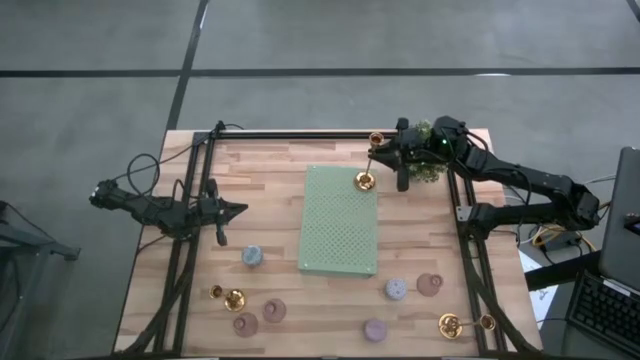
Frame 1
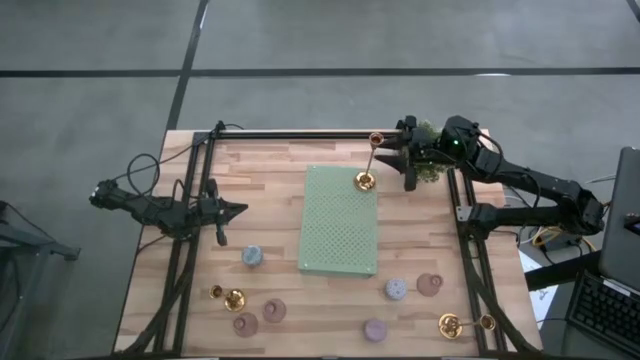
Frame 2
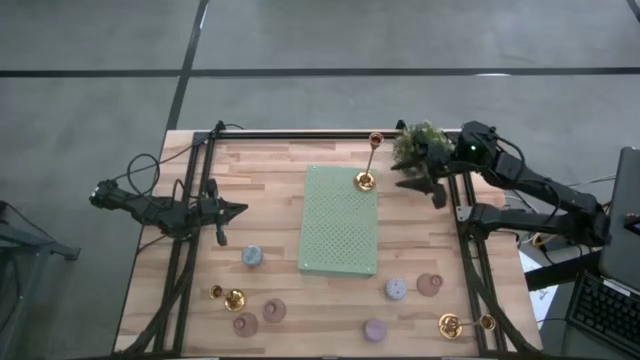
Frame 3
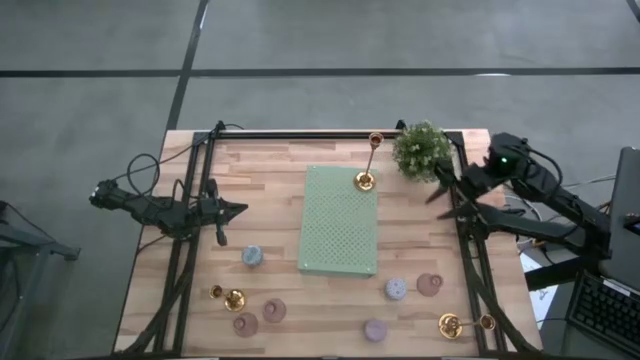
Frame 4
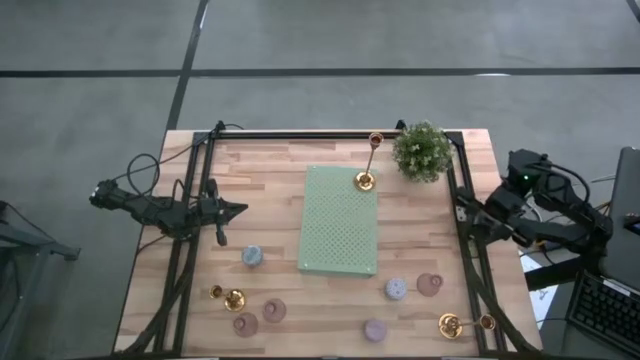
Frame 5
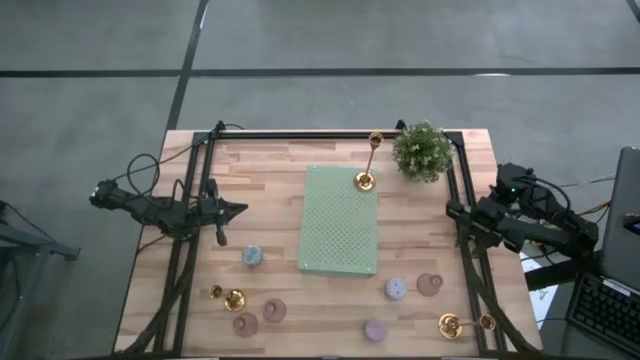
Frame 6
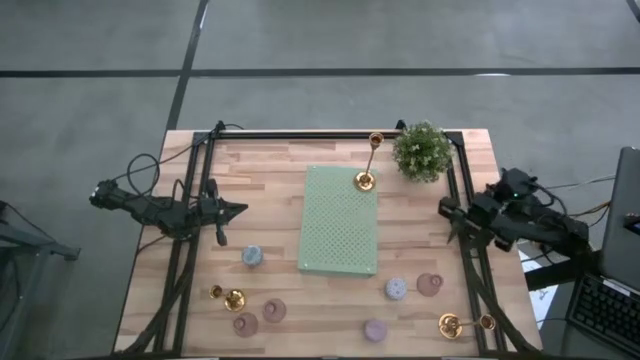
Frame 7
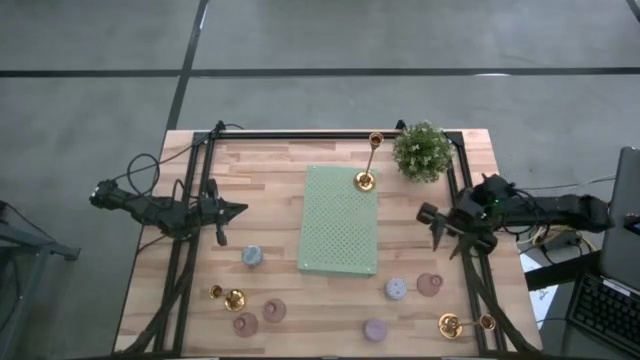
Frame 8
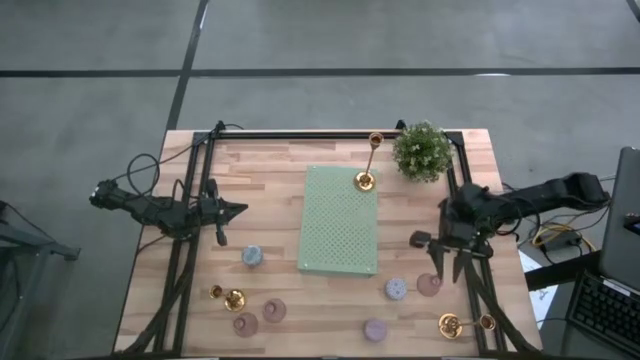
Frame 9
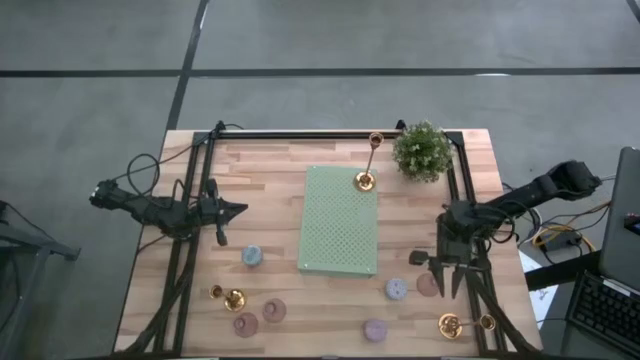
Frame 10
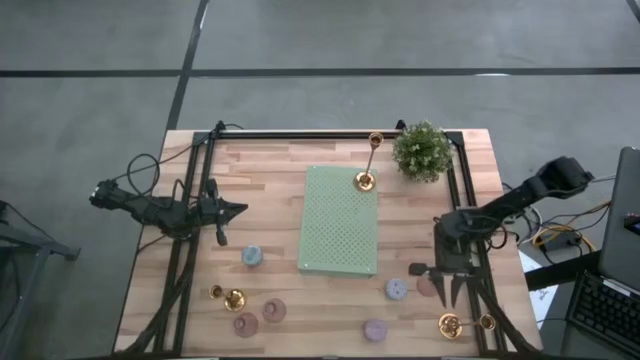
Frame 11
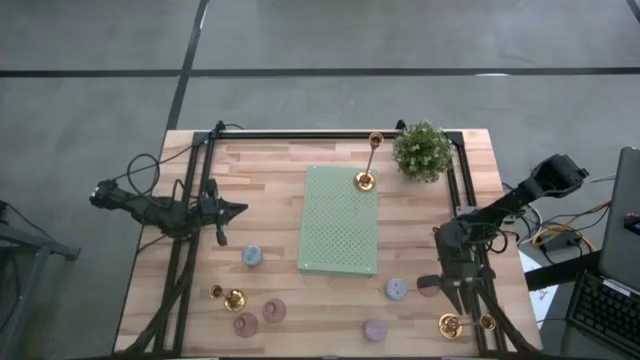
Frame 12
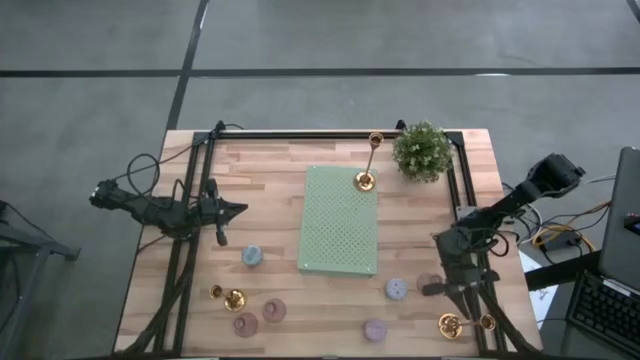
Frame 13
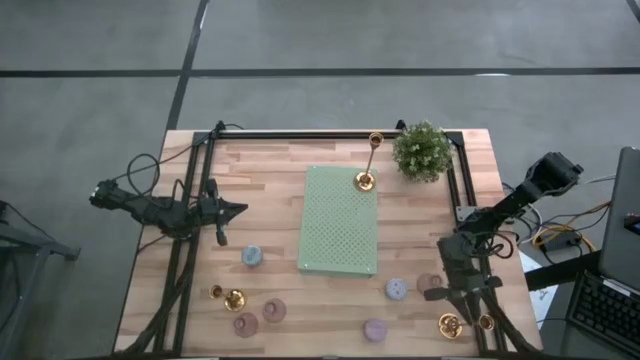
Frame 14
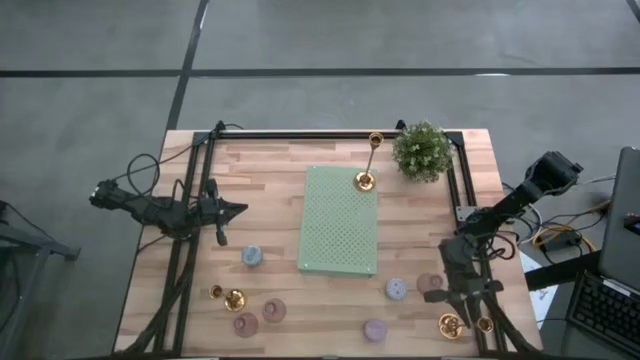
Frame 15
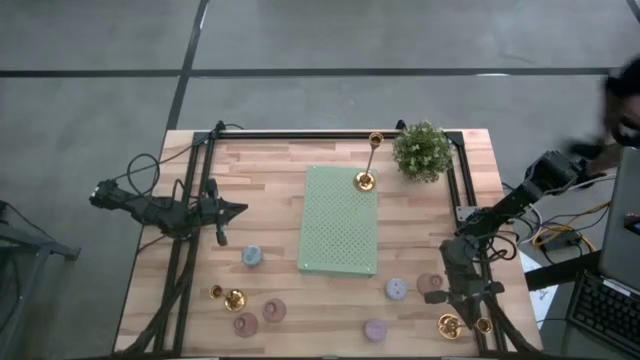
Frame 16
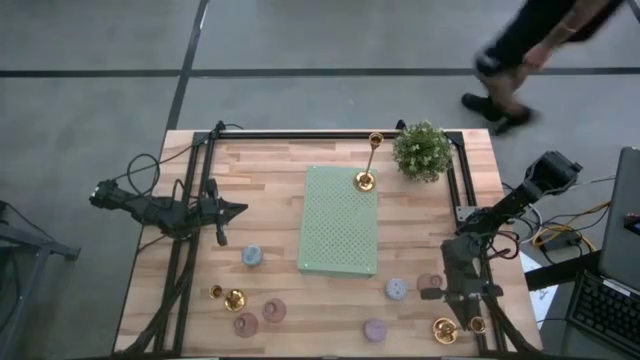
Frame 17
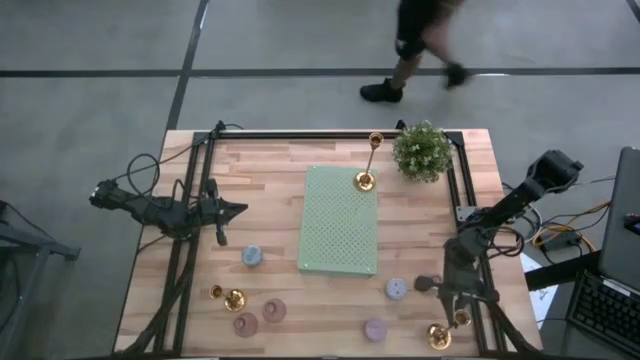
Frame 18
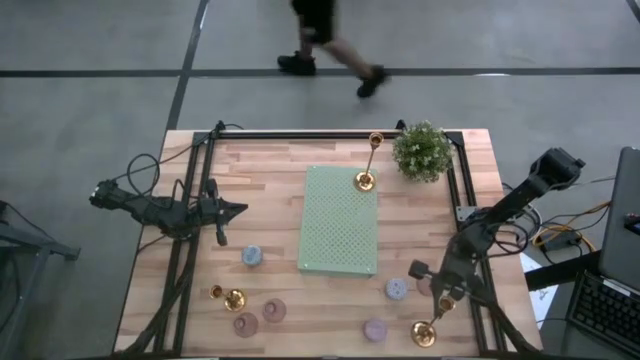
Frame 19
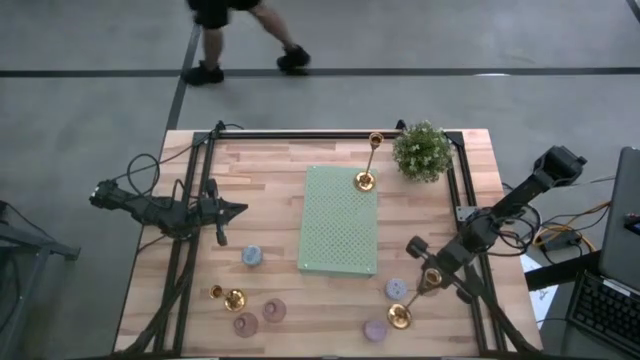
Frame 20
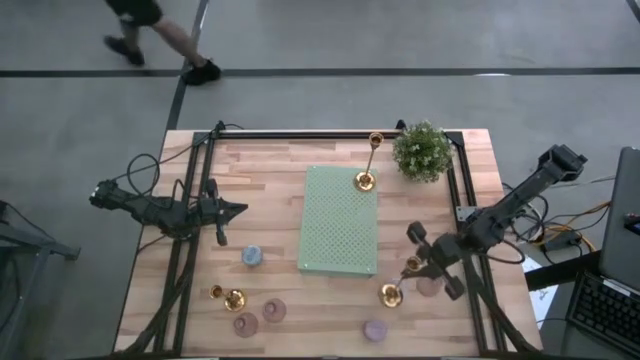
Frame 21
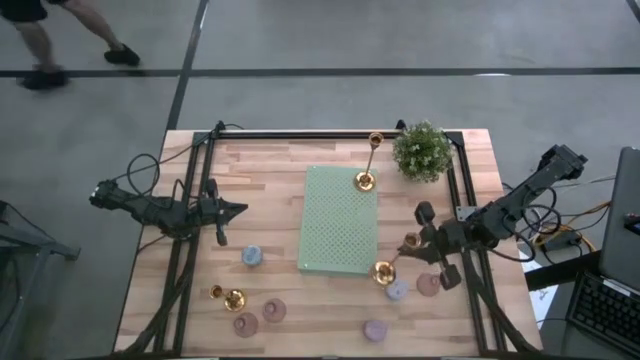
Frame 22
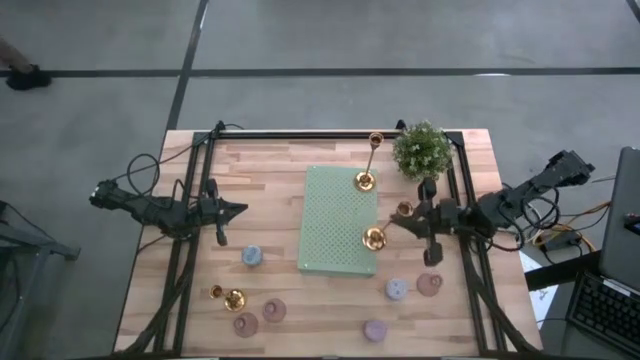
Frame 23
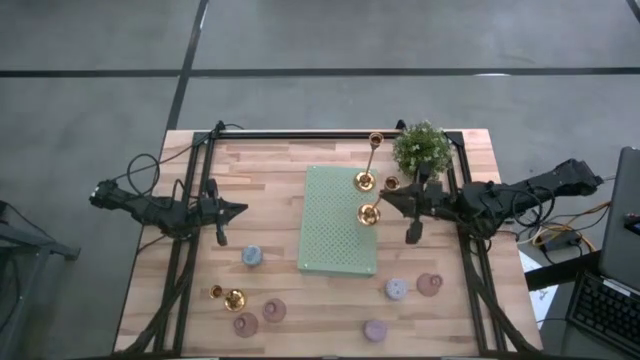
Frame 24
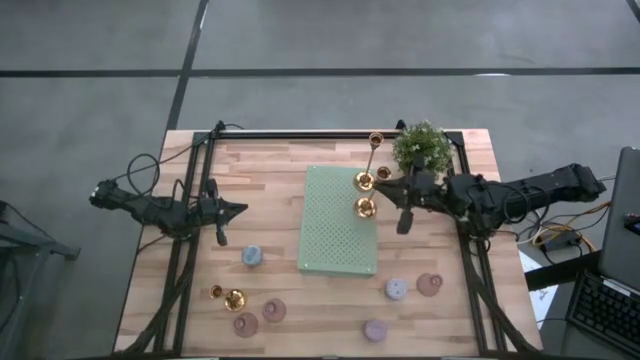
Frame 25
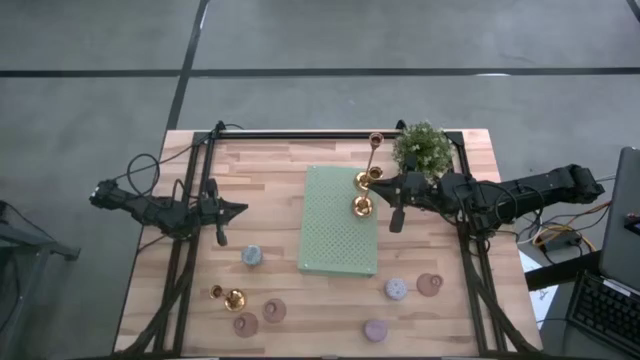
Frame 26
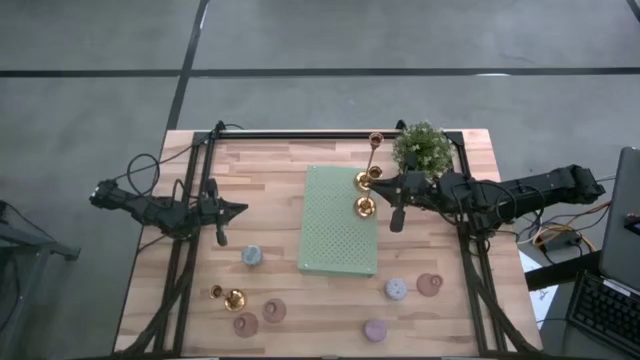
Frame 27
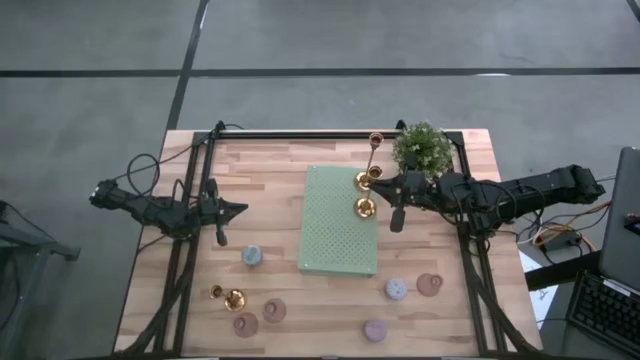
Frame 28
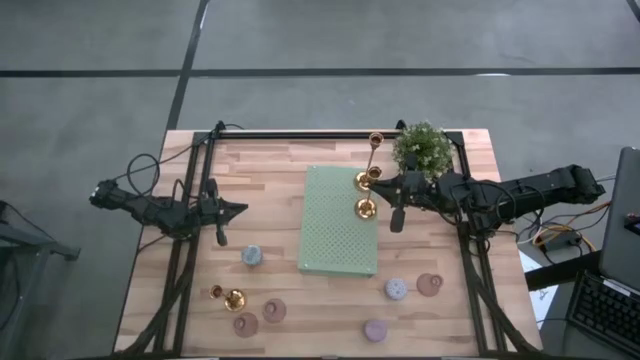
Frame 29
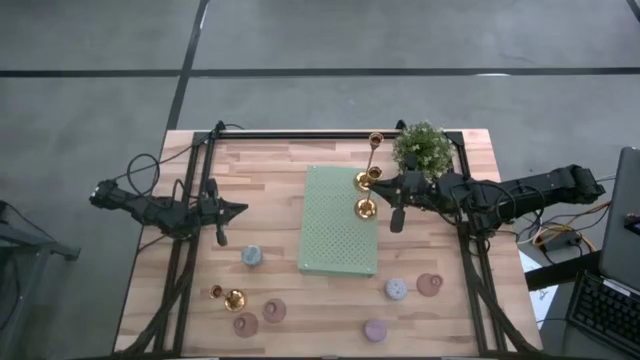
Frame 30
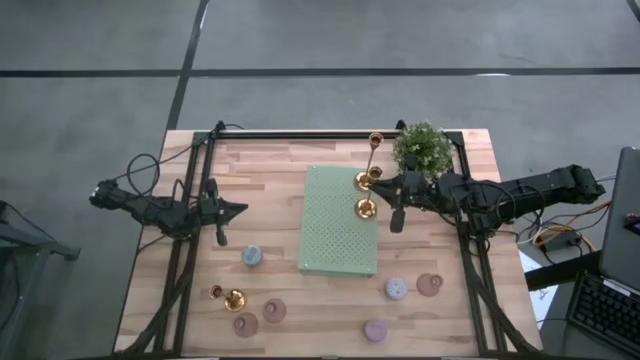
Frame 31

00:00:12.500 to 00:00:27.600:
Task: Pick & Place candle stick holders
Put the right gold candle holder on the shelf aligned with the other gold candle holder

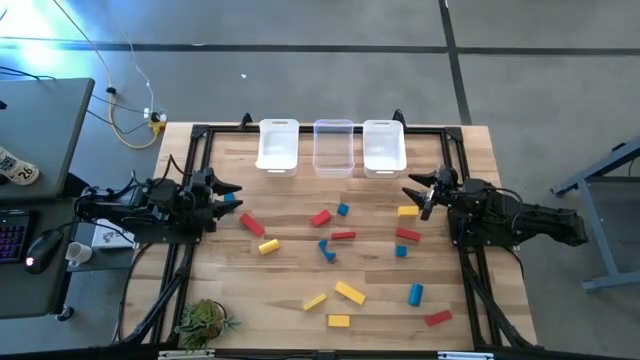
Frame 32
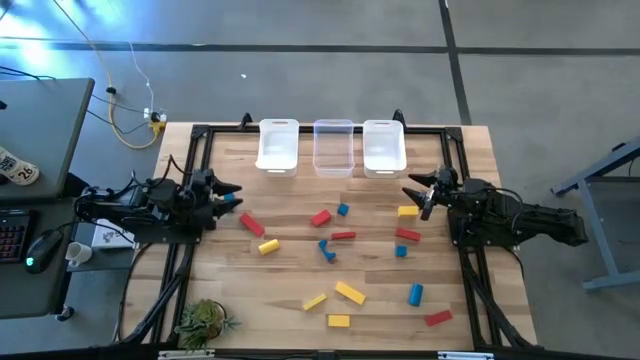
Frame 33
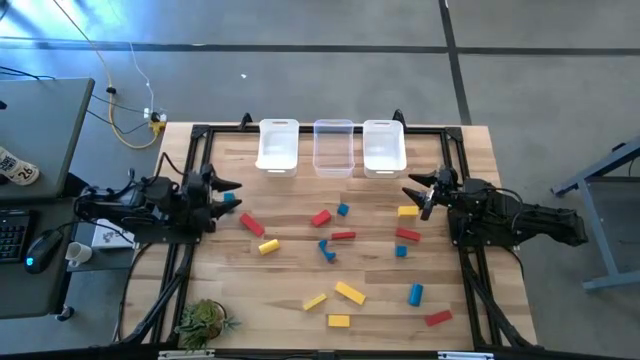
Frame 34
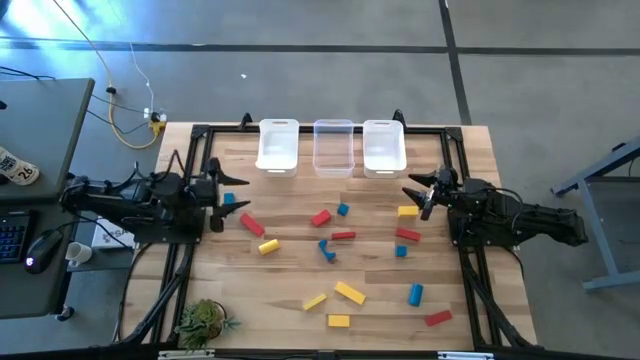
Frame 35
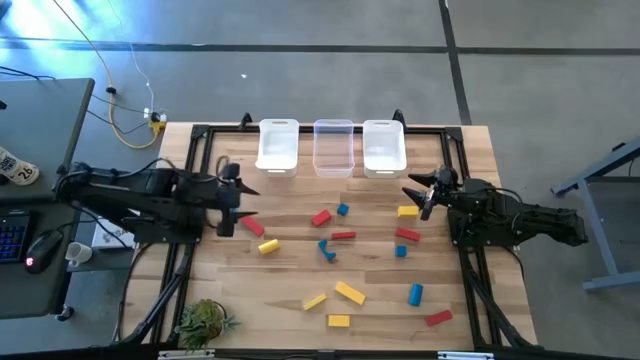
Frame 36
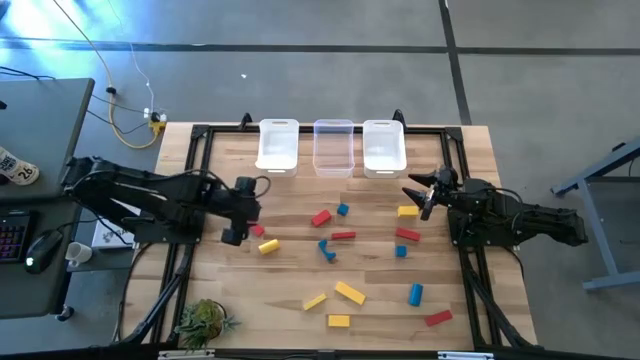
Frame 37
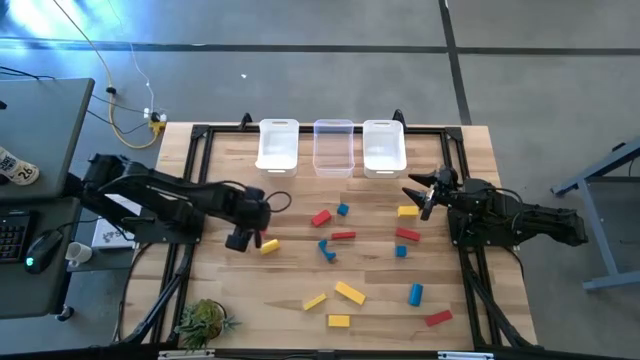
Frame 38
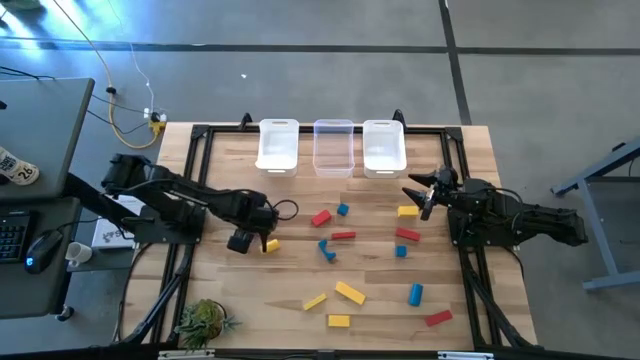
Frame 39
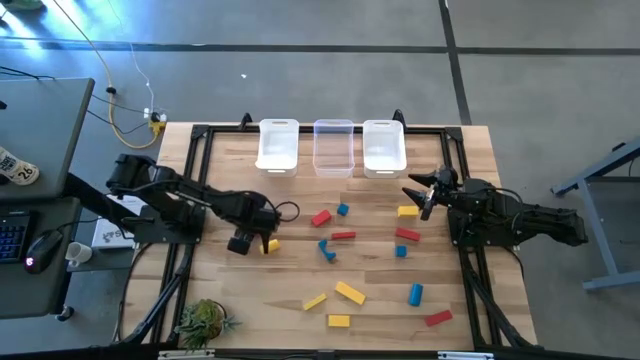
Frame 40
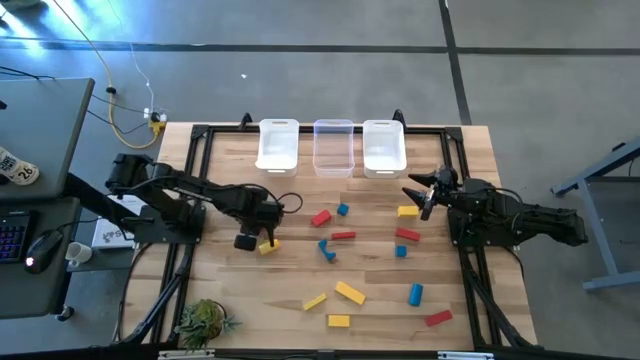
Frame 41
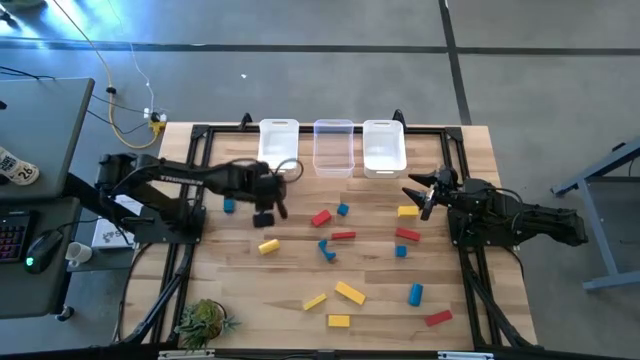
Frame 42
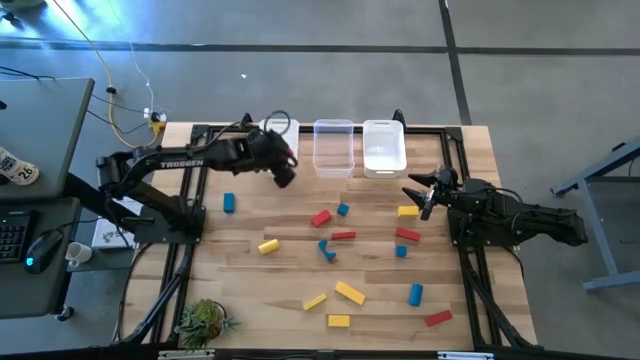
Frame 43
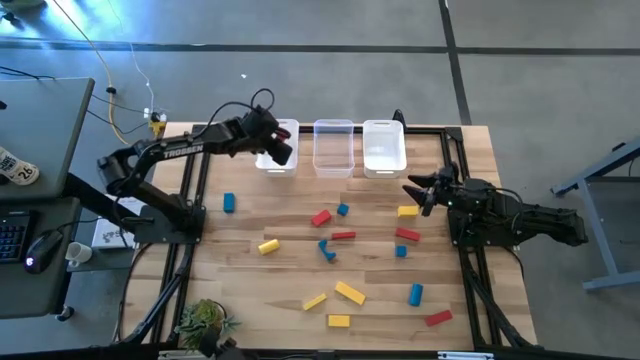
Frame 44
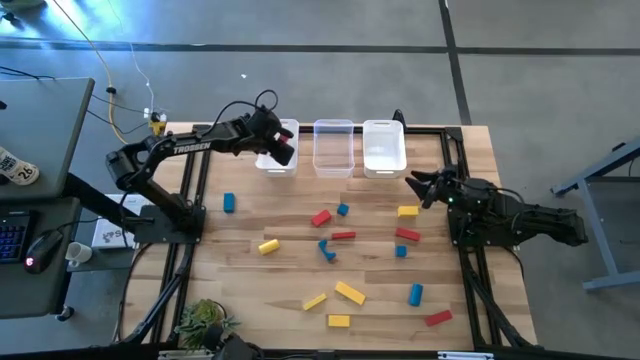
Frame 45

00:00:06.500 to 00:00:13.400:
Task: Sort & place blocks by color
Put the red block into the left white bin
